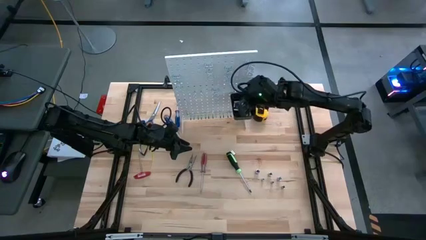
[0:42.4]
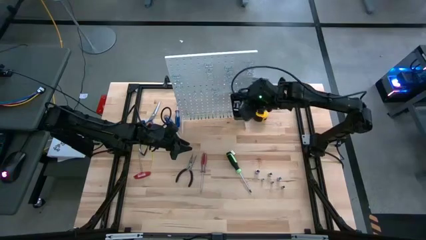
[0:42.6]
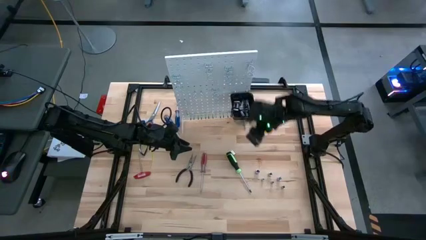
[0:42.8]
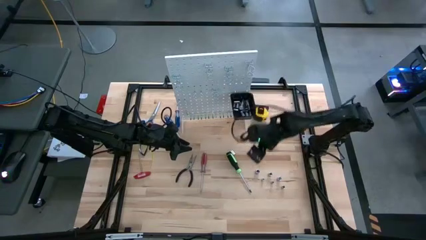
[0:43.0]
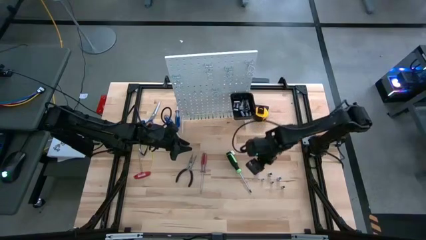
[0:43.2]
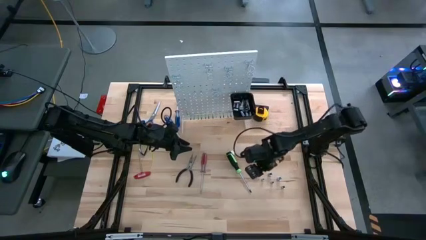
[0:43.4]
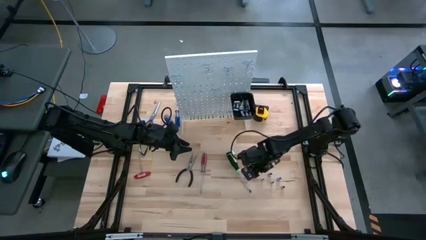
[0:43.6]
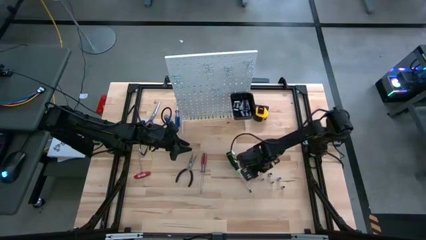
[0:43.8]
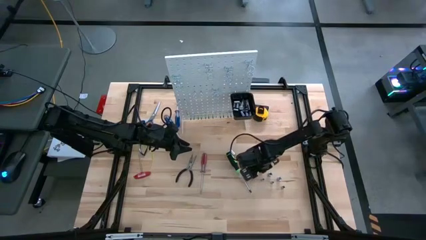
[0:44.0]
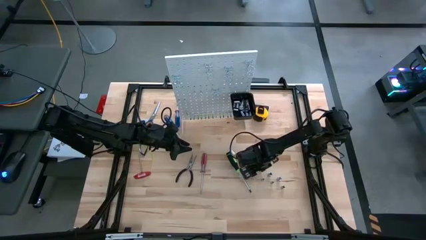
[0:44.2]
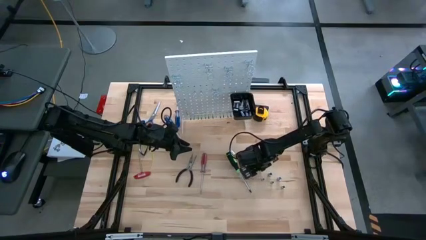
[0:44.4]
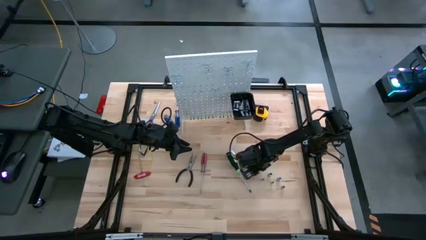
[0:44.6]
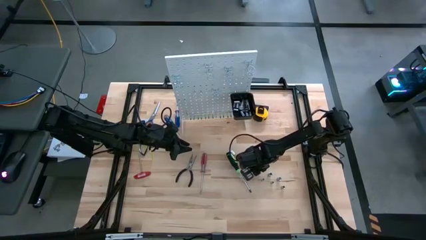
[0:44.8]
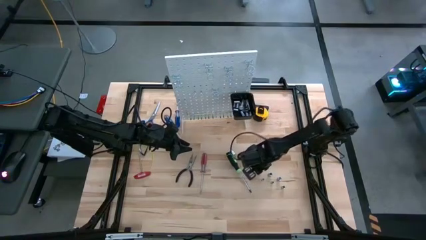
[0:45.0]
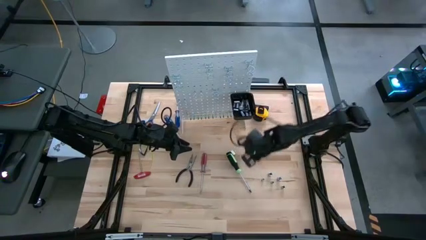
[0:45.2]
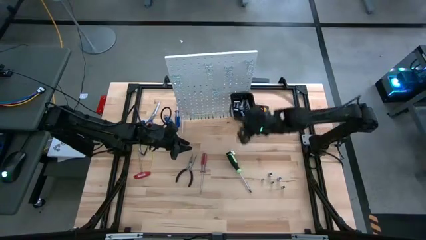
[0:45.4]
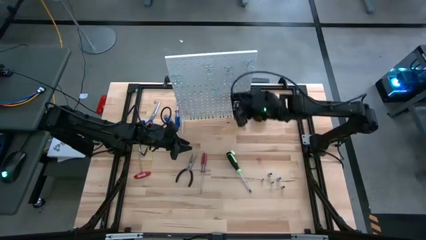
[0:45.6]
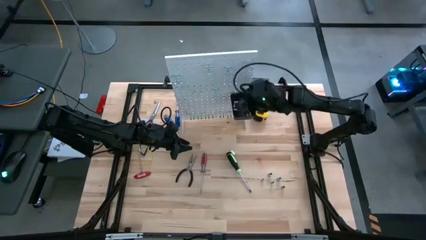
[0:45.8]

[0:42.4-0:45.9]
Task: Hang tools onto peg board
Put the silver socket into the black bin on the peg board

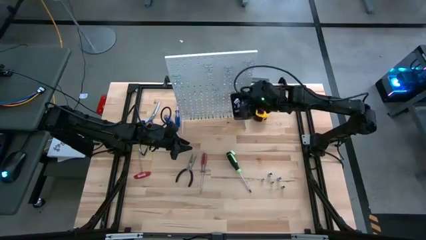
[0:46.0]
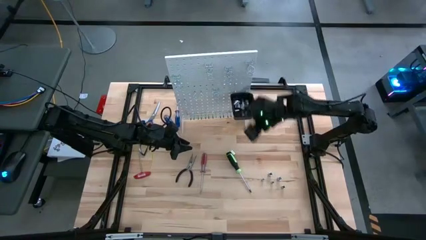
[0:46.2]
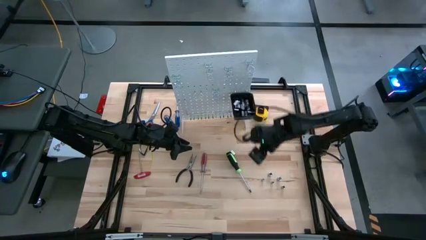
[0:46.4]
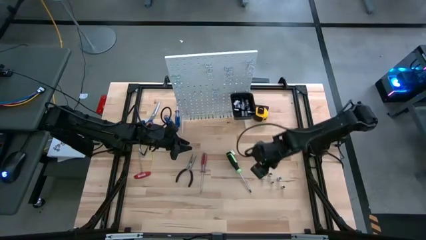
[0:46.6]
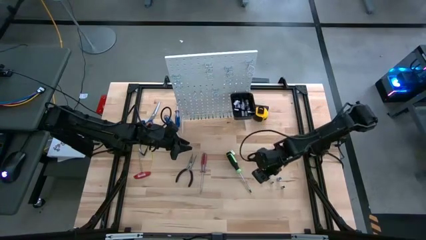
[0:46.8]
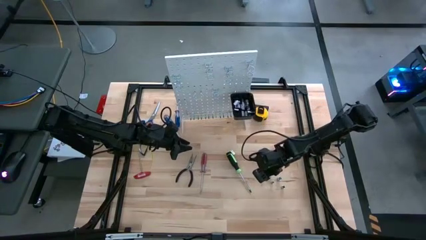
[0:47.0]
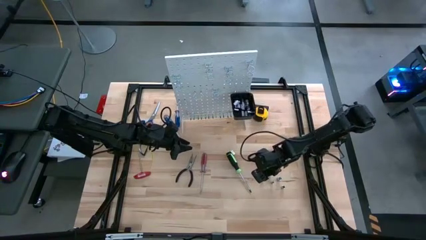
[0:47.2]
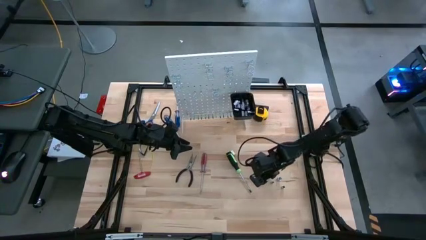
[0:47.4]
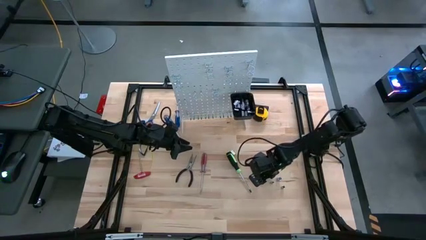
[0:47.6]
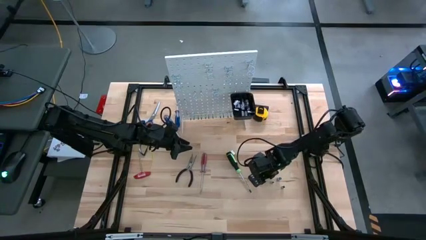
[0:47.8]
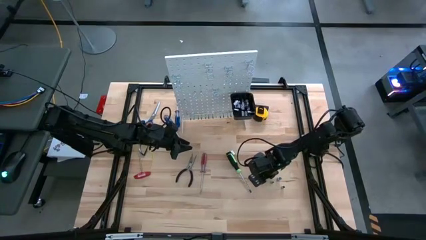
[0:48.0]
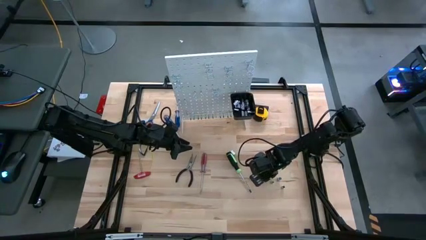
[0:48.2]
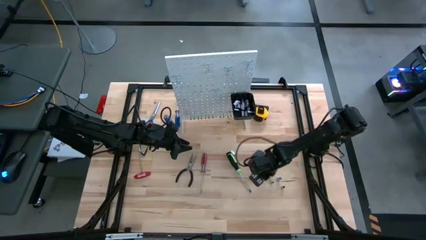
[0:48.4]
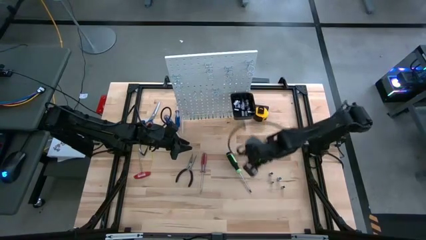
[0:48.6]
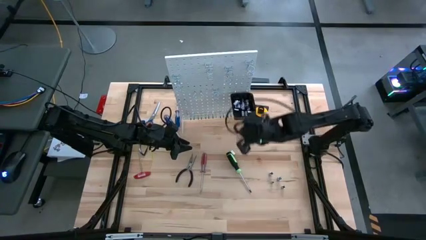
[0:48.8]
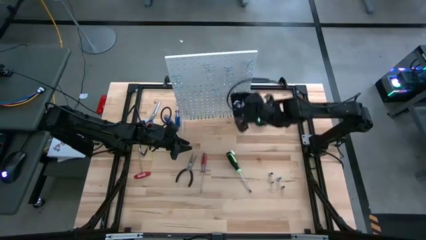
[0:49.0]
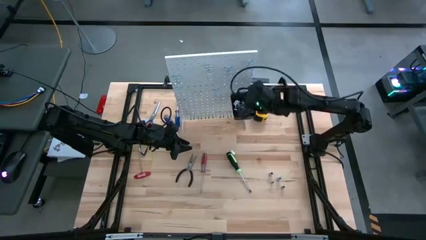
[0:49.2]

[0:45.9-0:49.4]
Put the silver socket into the black bin on the peg board

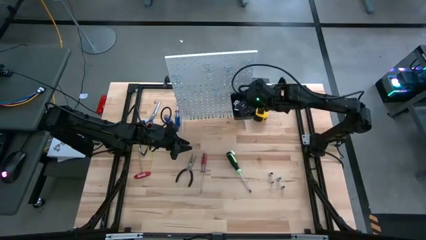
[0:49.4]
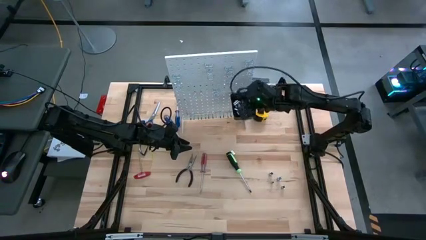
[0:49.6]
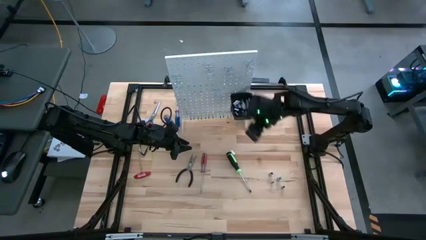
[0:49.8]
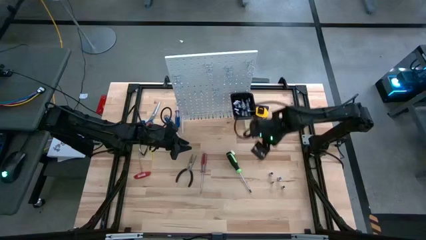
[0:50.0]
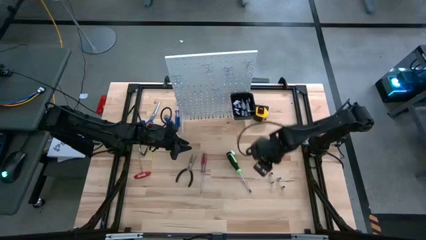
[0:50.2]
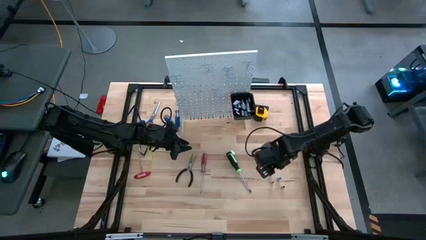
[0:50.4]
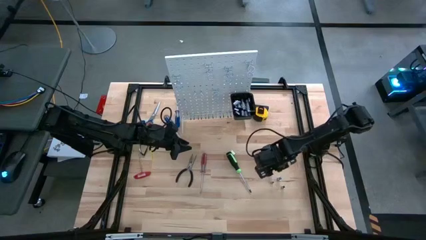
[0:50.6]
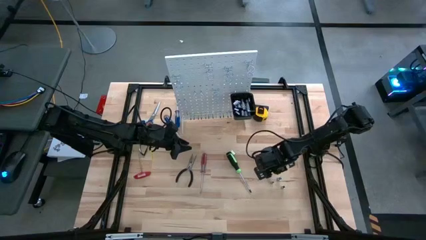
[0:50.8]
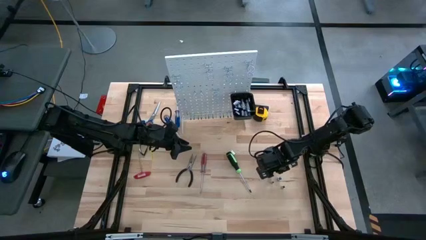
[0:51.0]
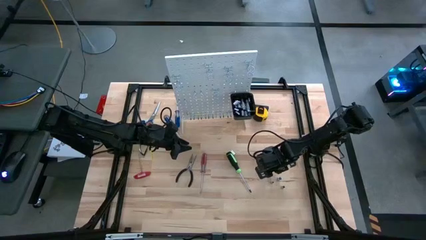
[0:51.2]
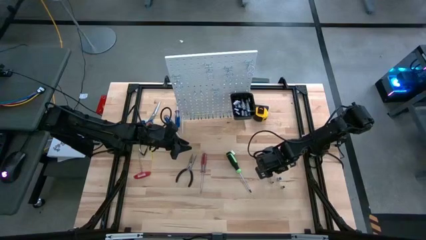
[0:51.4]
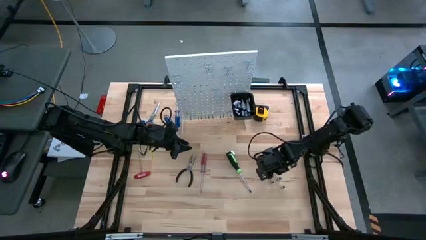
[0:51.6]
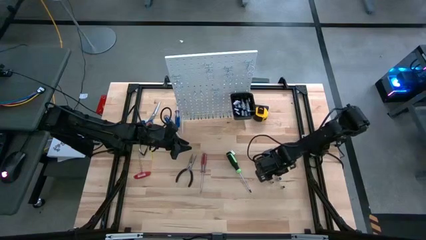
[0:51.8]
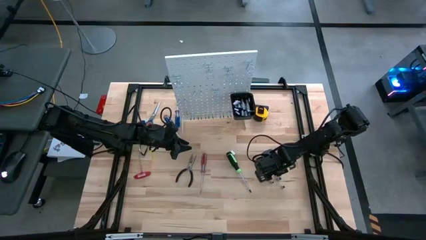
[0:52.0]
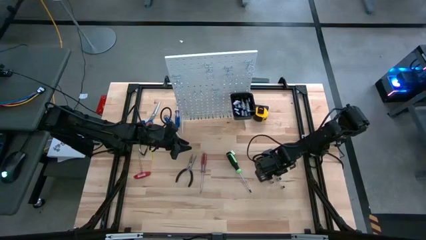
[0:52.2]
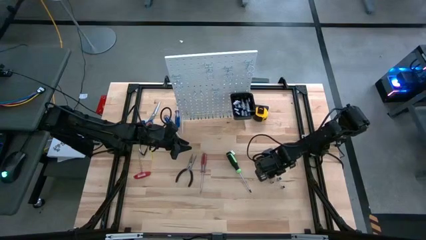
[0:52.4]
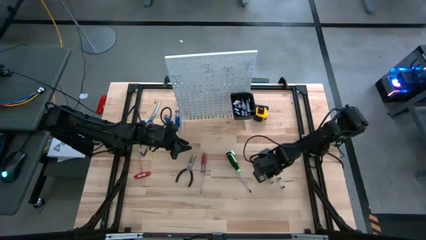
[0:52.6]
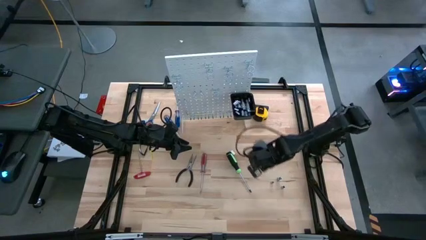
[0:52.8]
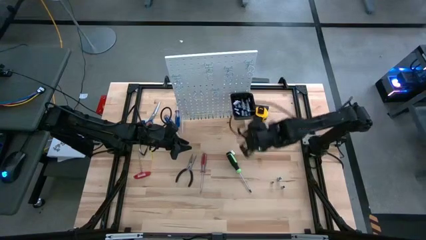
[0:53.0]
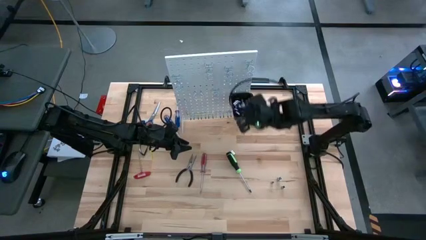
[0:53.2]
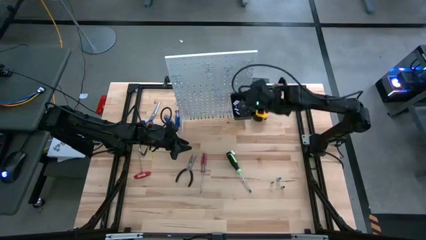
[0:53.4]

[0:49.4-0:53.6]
Put the silver socket into the black bin on the peg board

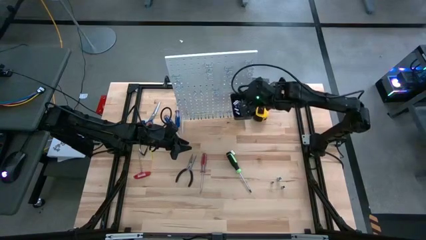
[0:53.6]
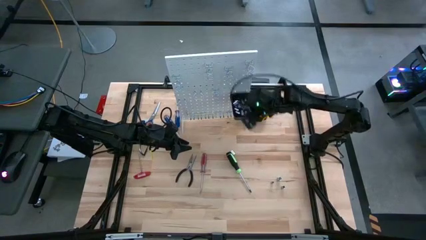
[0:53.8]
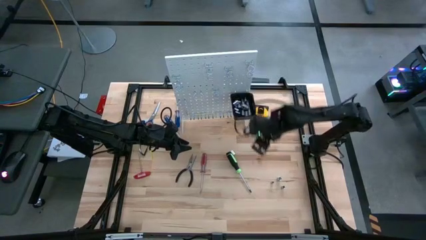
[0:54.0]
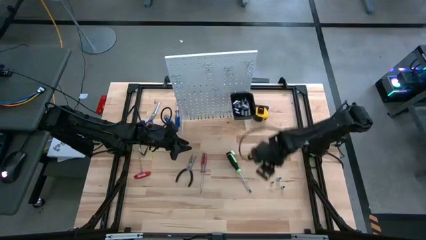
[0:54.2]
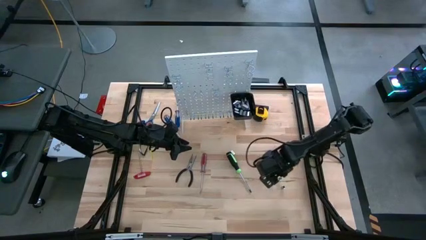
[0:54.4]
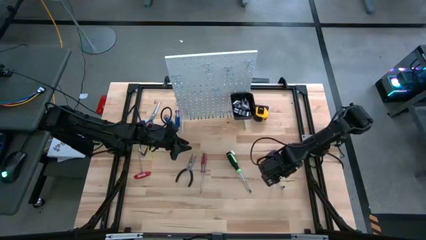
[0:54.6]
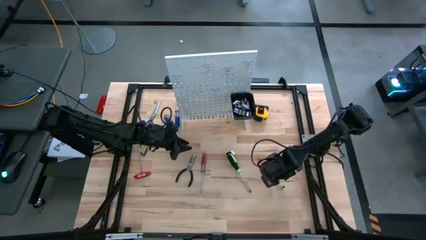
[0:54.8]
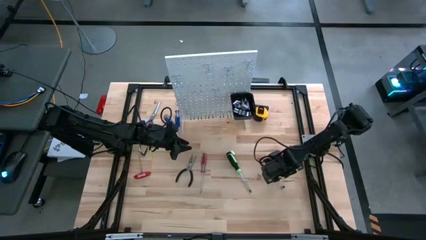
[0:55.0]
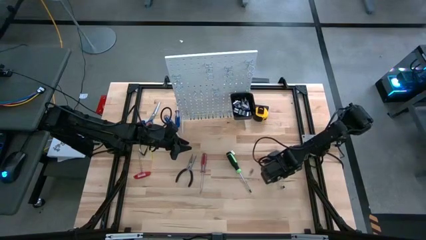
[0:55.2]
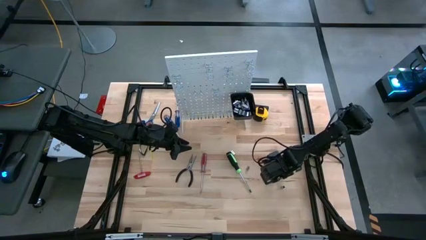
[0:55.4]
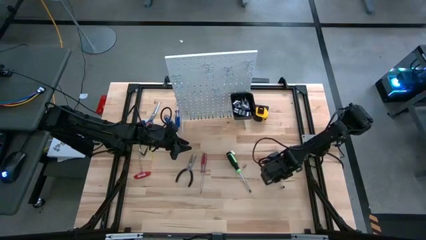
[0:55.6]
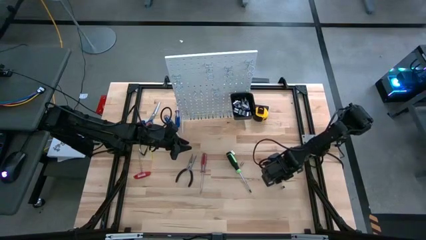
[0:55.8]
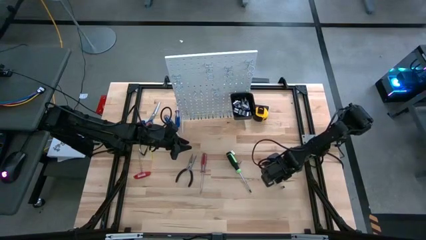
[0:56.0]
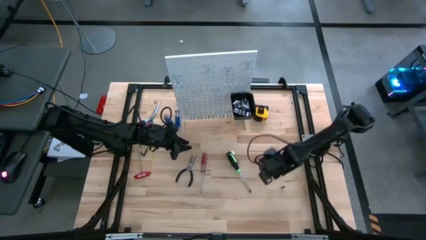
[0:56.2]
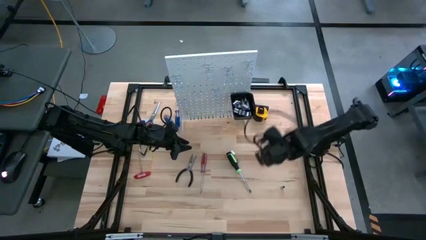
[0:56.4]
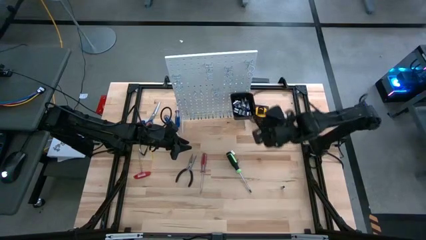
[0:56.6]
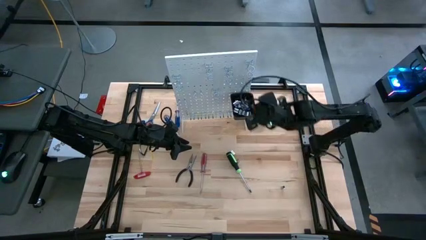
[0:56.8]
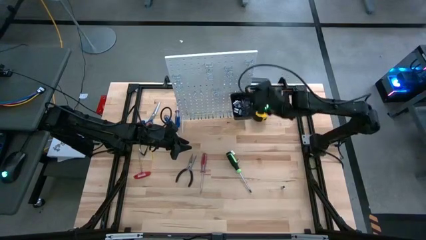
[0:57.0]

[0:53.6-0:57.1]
Put the silver socket into the black bin on the peg board
